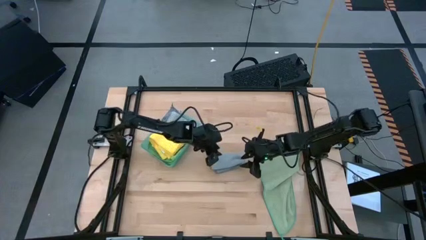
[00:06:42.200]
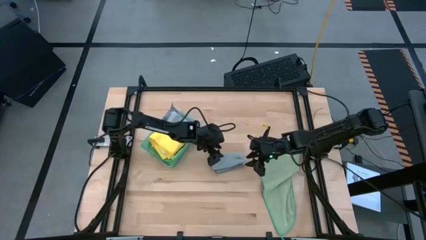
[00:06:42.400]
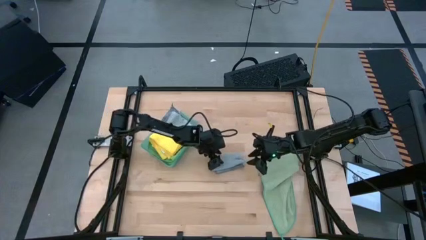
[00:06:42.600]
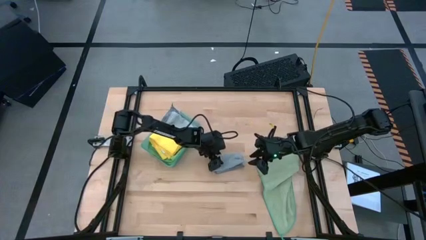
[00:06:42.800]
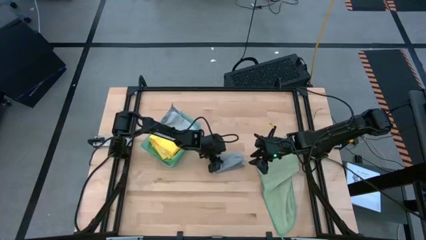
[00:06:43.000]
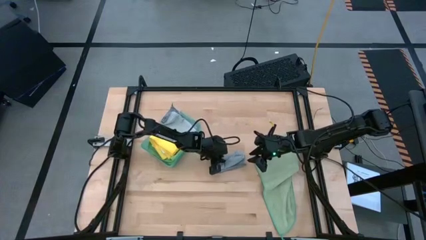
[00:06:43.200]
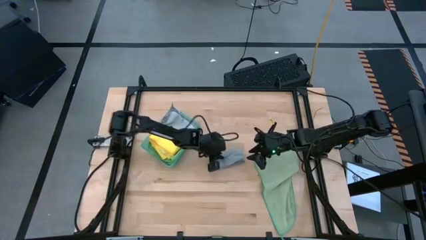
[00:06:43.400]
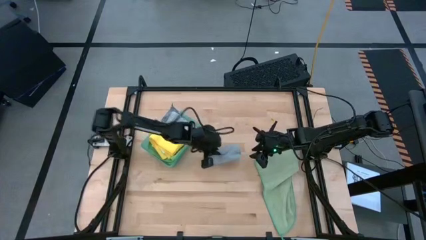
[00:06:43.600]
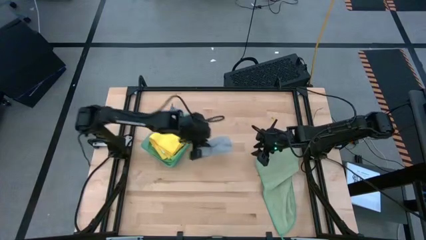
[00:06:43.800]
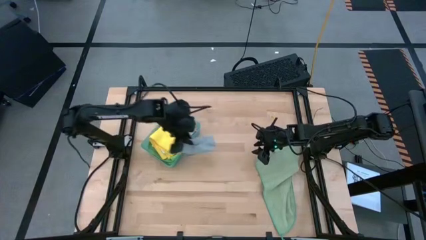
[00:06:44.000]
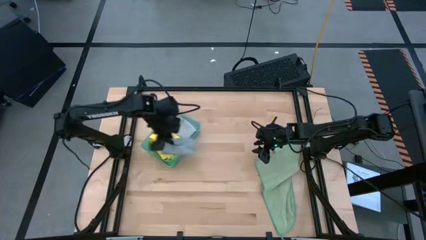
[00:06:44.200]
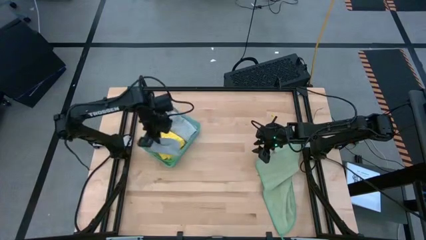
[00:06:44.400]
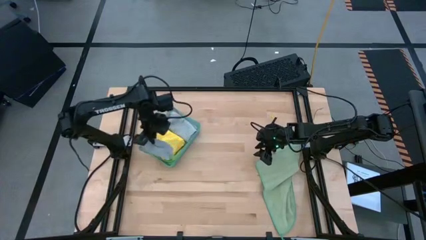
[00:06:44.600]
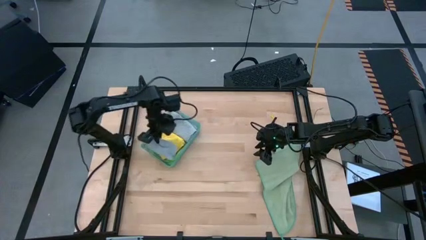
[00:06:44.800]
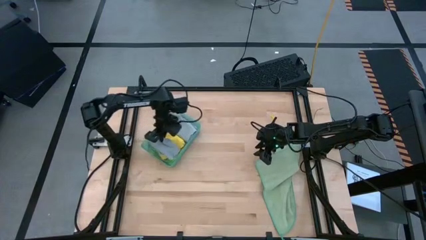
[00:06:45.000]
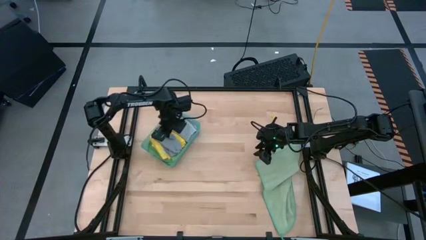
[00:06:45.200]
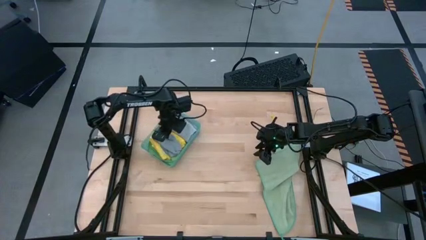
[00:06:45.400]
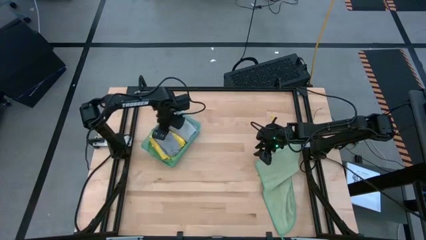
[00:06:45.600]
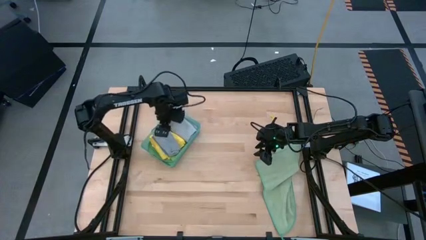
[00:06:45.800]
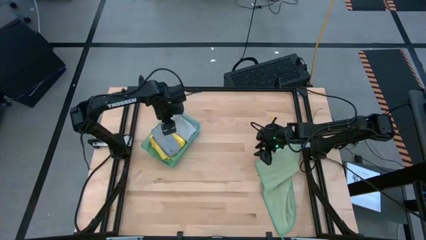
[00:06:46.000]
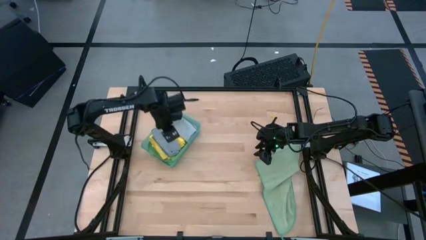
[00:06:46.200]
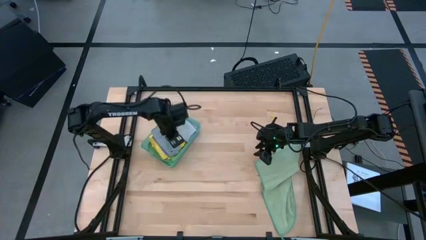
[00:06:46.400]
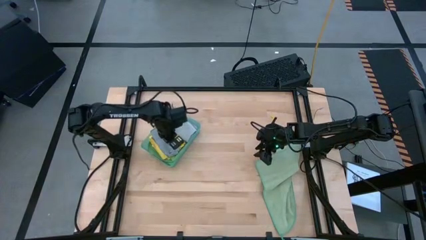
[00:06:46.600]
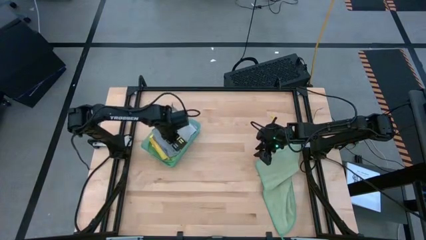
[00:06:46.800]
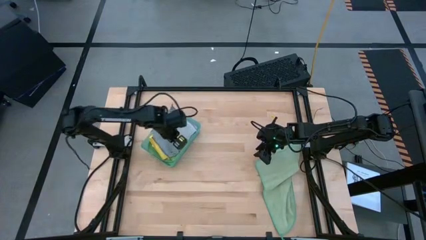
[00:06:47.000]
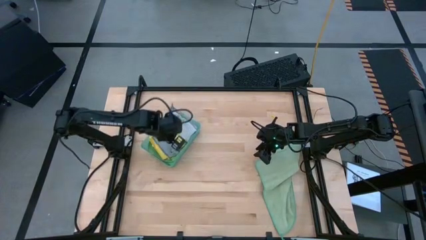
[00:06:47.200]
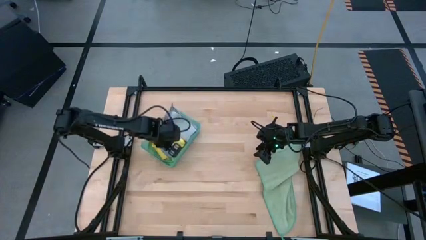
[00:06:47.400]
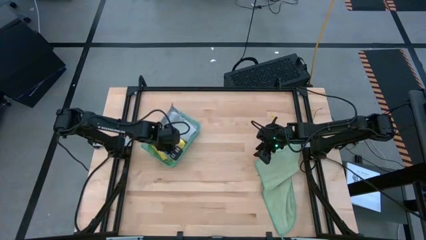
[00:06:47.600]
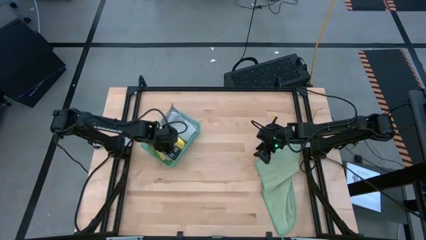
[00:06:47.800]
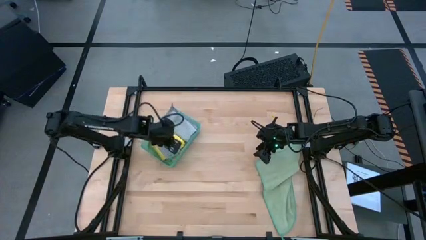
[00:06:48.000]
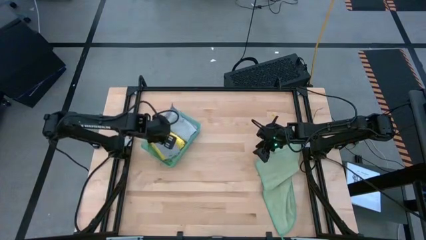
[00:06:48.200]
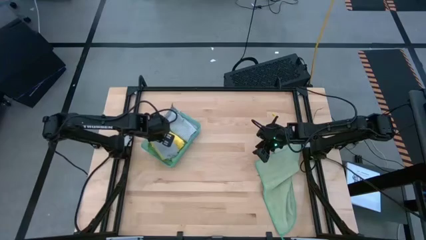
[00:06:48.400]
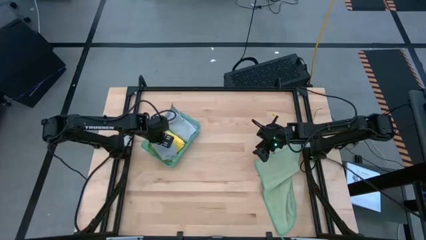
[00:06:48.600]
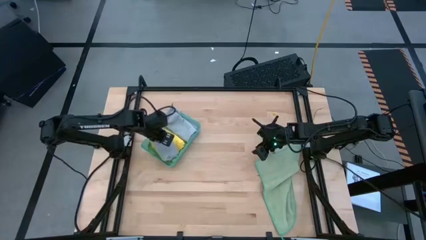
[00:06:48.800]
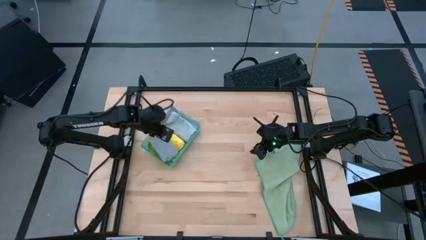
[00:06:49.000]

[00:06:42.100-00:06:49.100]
Task: Fold microfiber towels
Put the gray microfiber cloth into the green bin

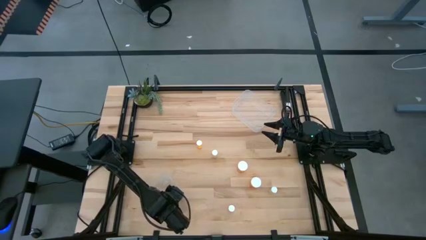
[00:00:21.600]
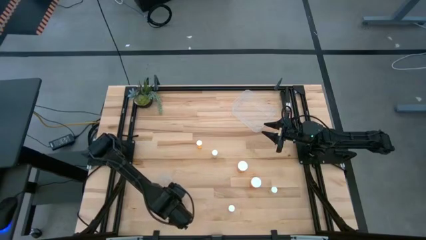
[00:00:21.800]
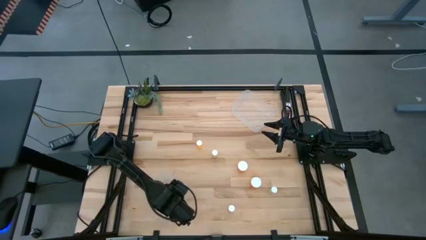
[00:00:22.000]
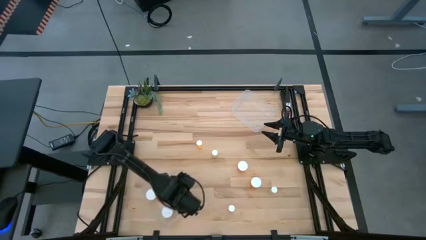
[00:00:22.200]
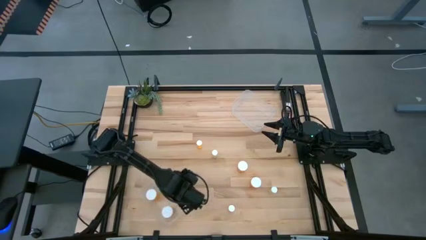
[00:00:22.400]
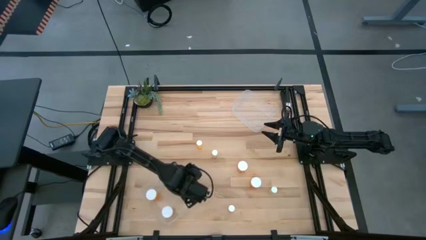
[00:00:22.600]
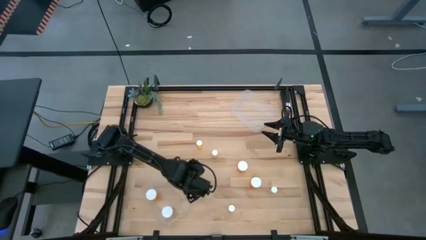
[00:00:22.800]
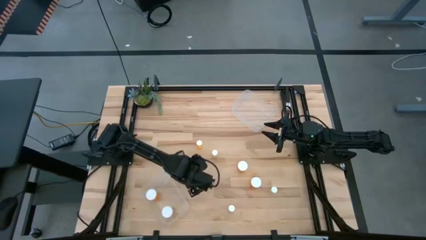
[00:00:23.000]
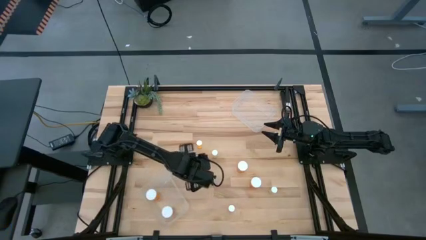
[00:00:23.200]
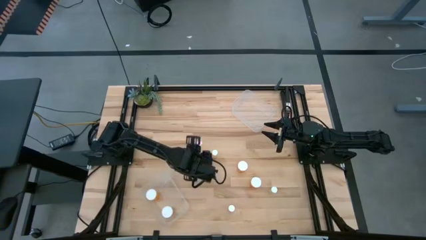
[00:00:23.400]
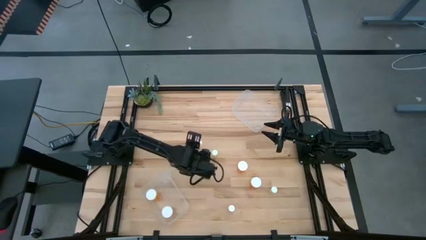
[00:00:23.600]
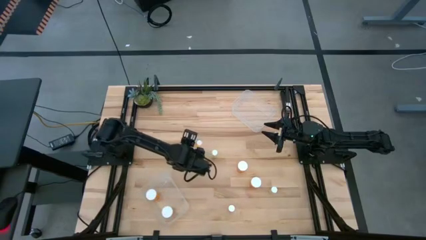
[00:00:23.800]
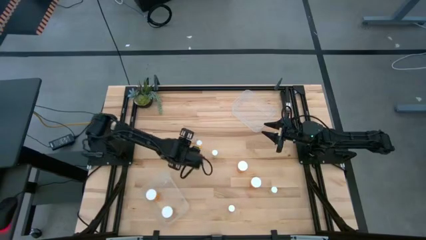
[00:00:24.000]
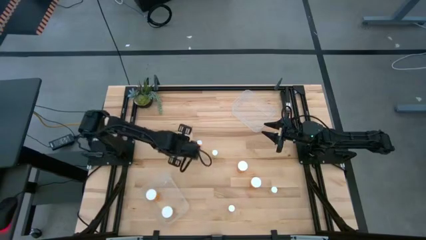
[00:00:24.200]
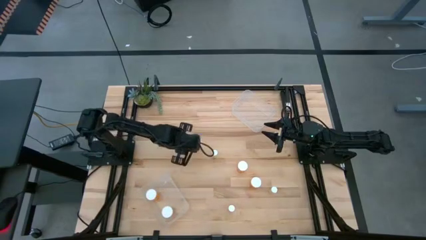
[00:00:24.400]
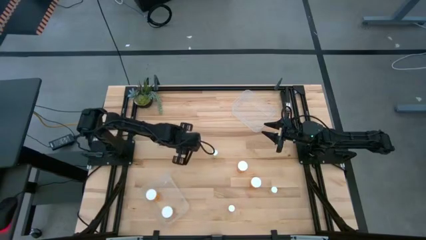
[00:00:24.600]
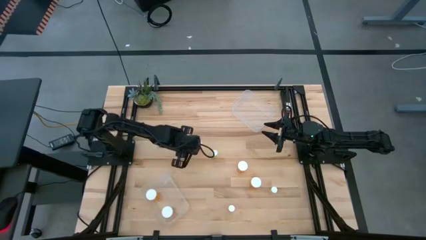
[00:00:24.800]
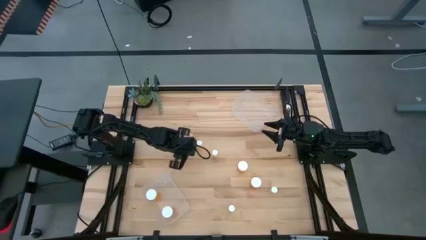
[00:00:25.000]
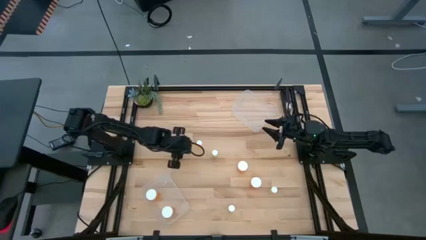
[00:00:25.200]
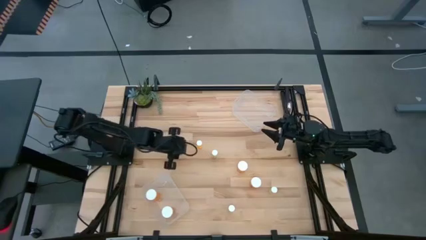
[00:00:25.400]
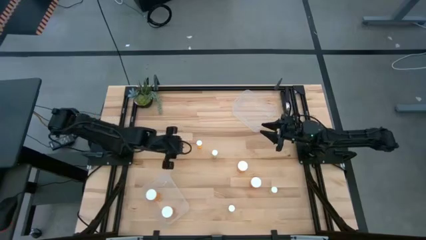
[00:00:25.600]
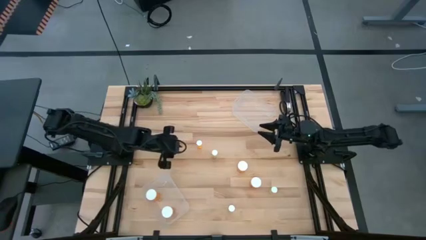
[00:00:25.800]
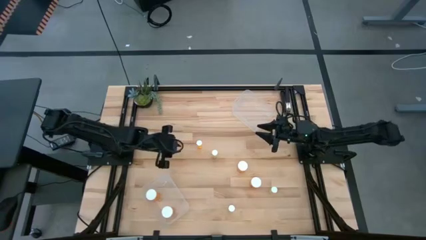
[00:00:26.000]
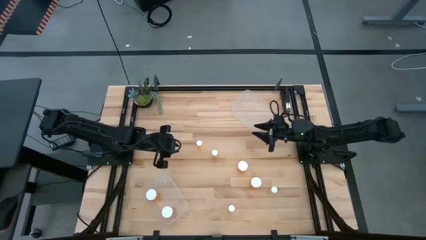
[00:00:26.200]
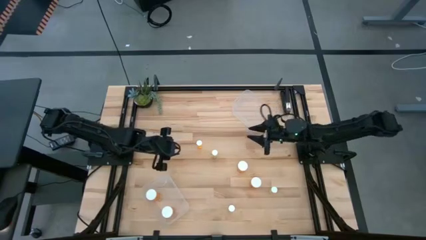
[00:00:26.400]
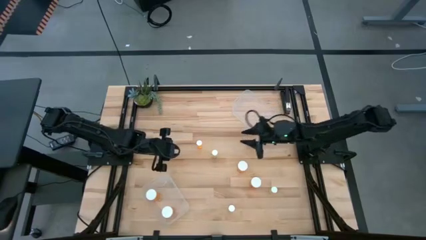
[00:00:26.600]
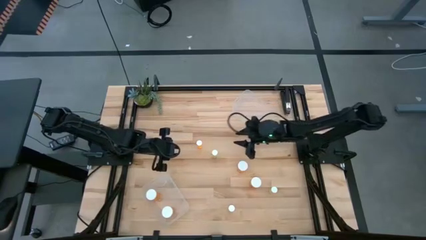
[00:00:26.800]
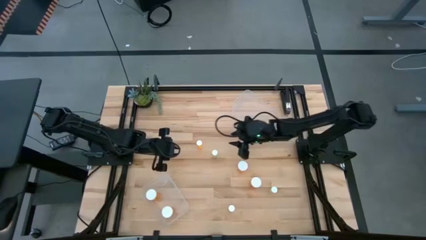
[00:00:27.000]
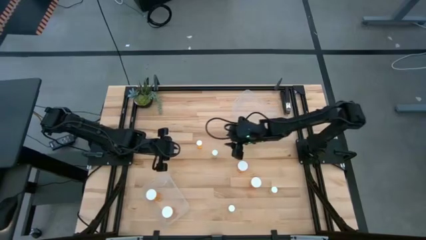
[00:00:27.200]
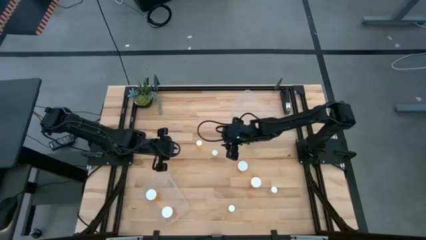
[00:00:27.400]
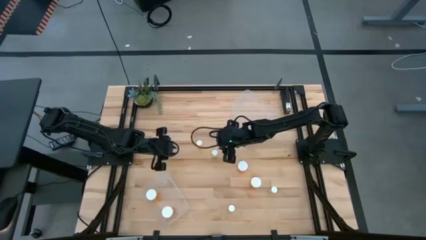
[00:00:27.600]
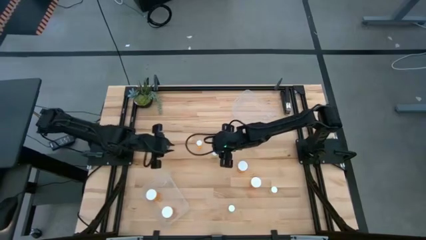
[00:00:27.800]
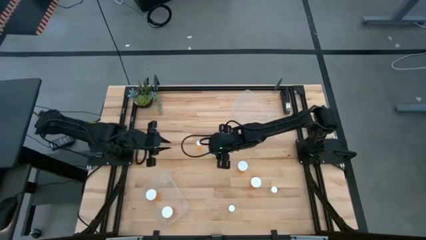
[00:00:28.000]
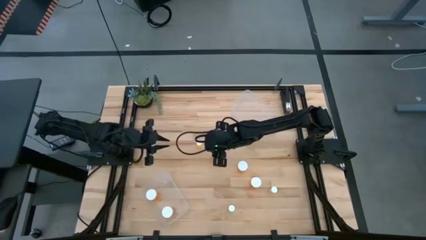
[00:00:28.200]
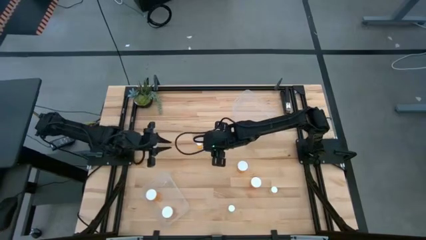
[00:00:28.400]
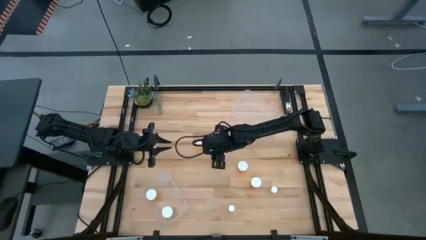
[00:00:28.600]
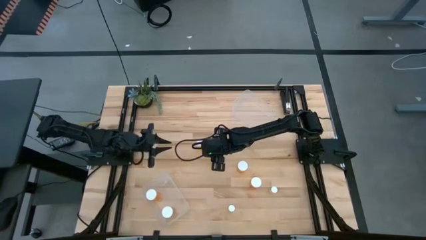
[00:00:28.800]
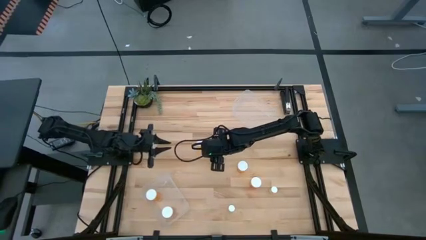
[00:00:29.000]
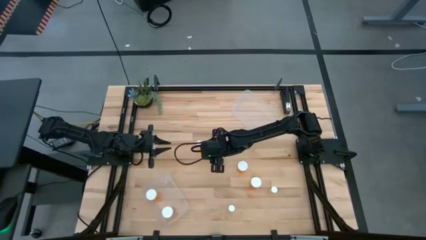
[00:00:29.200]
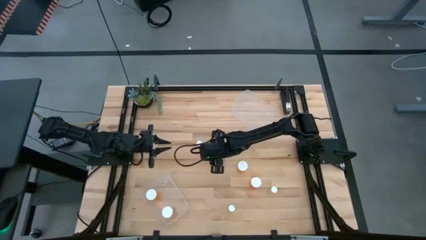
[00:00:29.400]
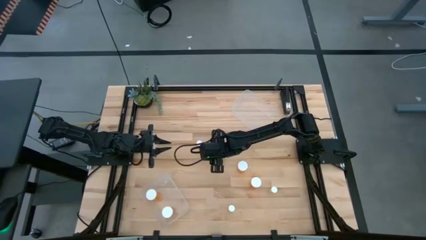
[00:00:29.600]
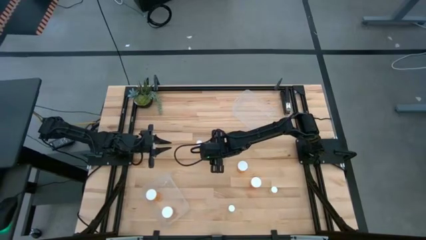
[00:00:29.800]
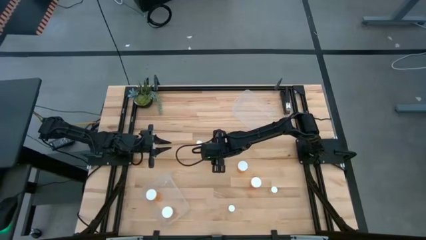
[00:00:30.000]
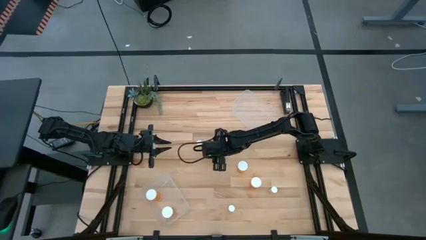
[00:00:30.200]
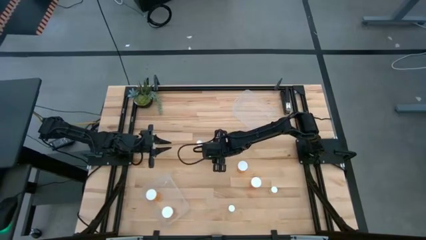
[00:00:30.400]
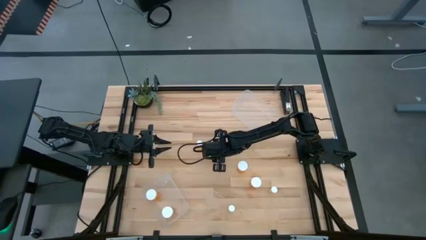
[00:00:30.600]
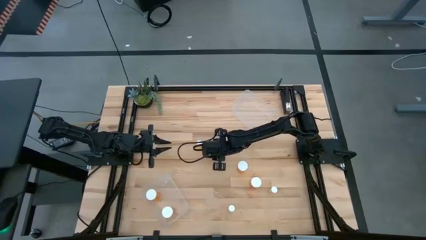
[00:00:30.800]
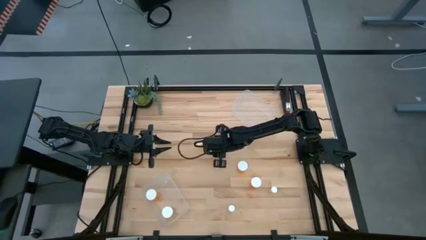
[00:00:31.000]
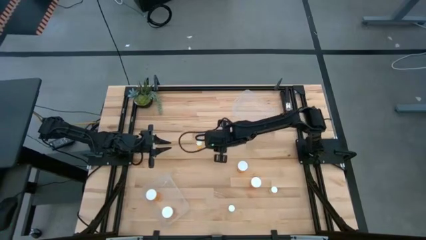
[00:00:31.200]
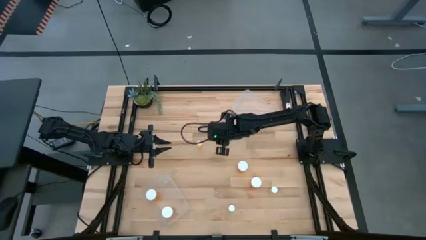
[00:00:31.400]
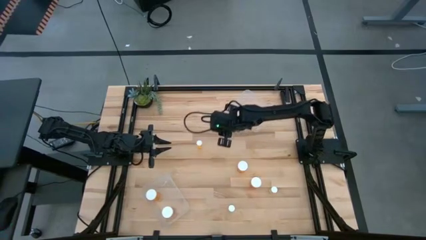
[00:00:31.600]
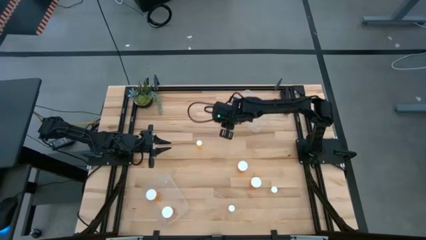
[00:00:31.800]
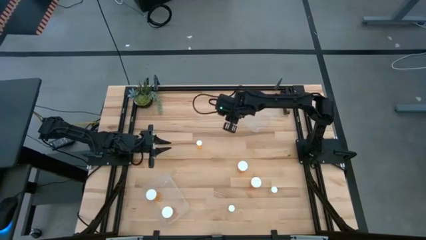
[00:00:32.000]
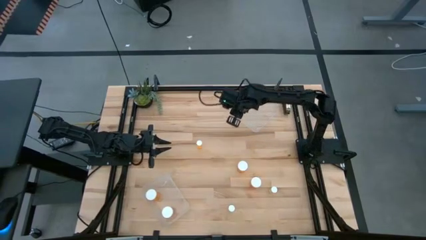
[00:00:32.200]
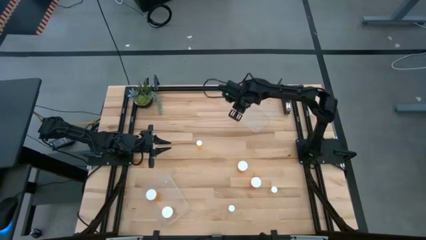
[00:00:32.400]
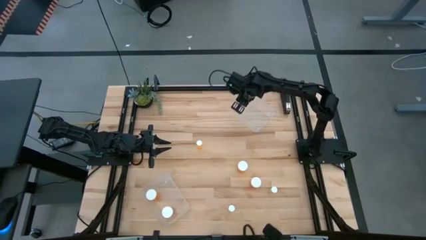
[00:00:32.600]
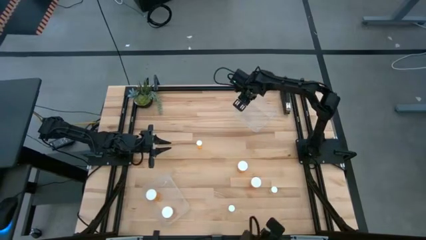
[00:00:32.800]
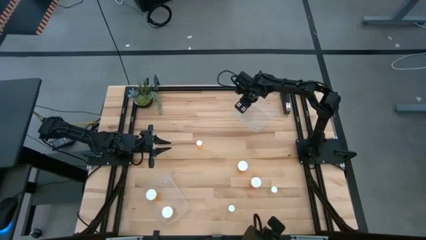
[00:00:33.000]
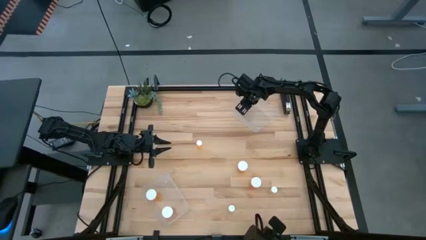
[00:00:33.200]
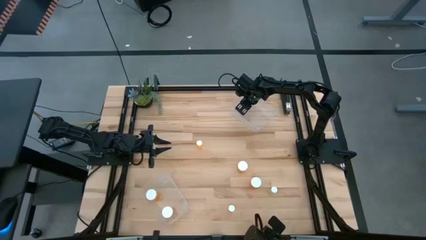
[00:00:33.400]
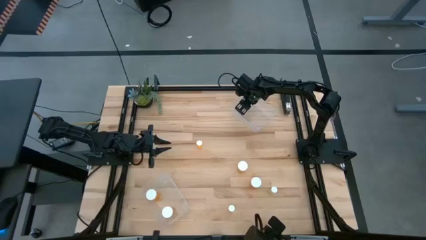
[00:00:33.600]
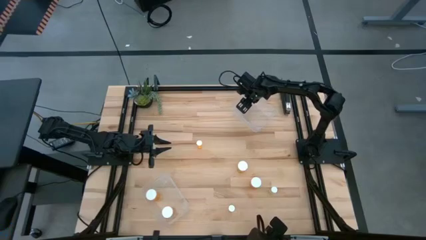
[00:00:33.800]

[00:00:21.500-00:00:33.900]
Task: Pick and place medicine bottles into bin by pill shape (circle, oval)
Put the small yellow pill bottle into the top transparent bin
